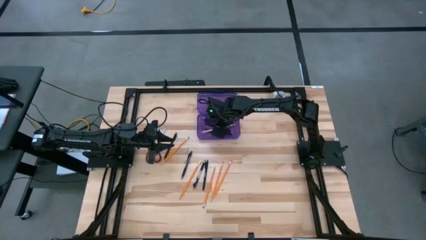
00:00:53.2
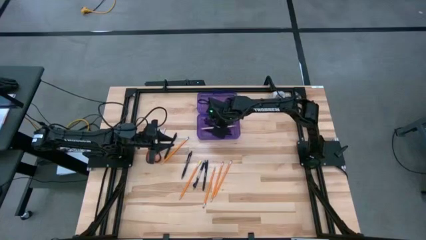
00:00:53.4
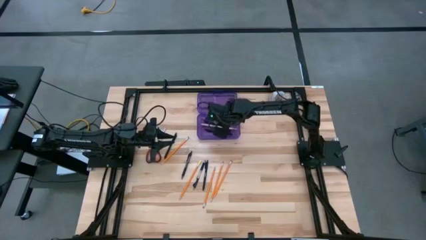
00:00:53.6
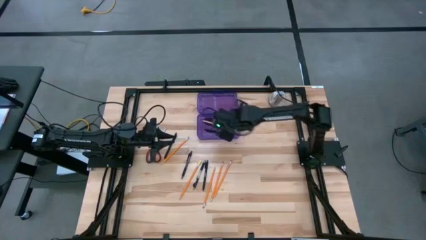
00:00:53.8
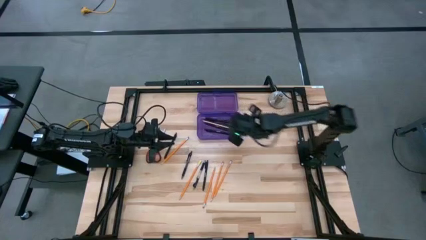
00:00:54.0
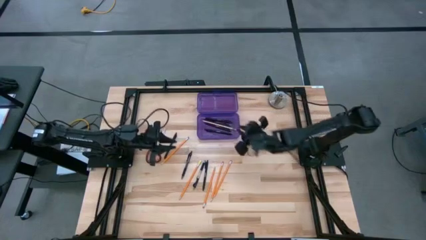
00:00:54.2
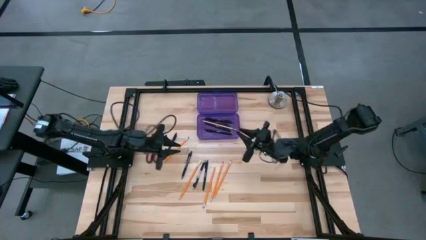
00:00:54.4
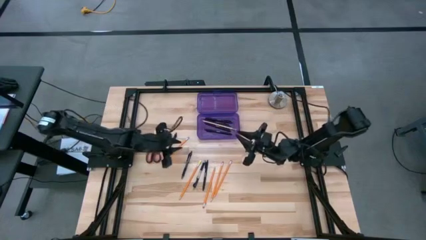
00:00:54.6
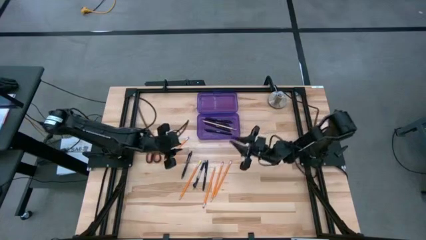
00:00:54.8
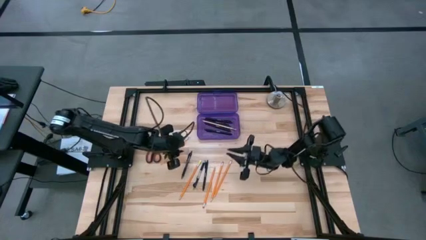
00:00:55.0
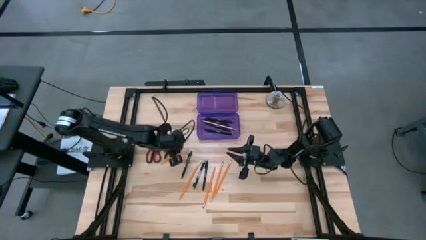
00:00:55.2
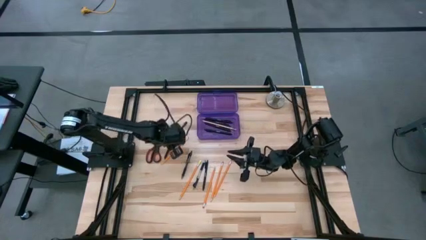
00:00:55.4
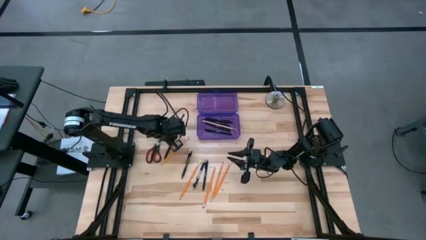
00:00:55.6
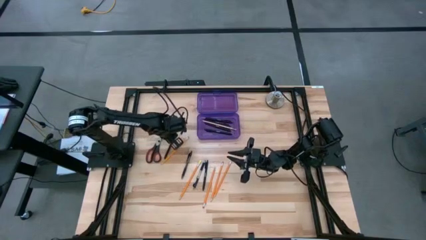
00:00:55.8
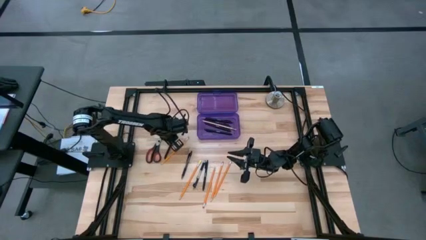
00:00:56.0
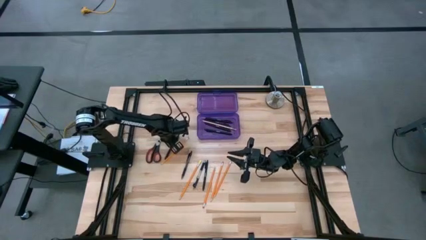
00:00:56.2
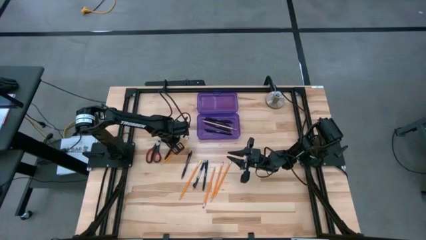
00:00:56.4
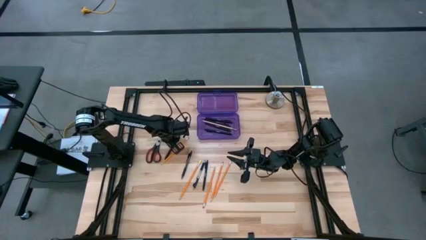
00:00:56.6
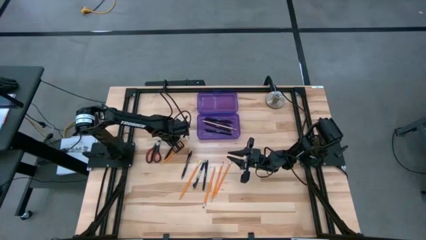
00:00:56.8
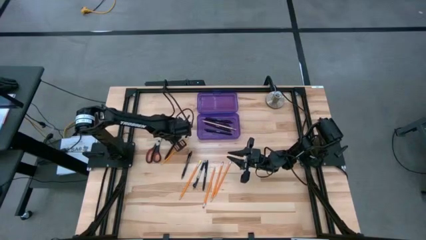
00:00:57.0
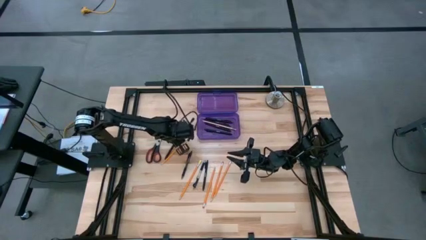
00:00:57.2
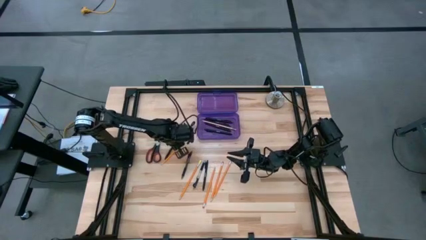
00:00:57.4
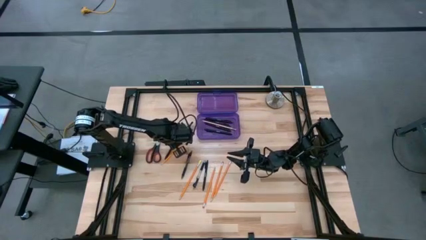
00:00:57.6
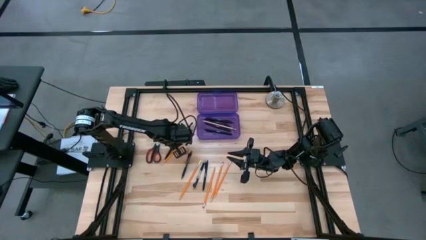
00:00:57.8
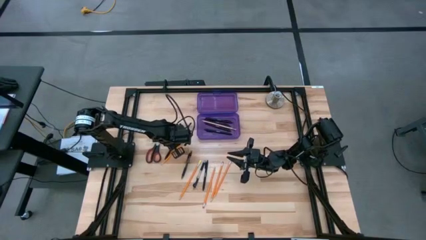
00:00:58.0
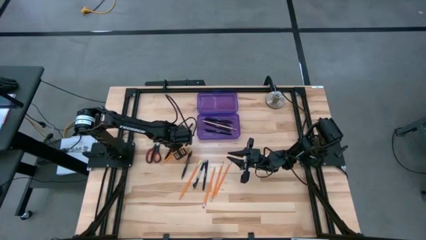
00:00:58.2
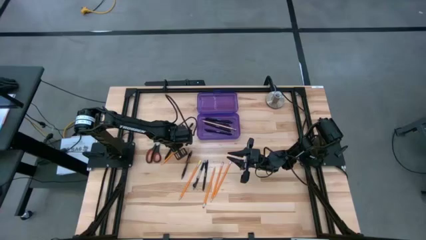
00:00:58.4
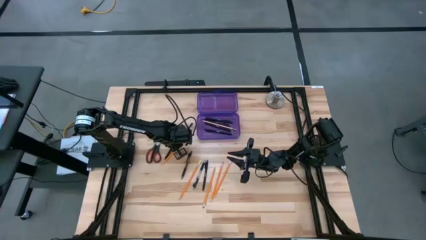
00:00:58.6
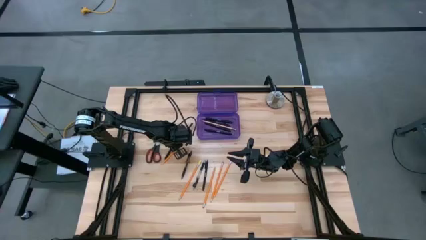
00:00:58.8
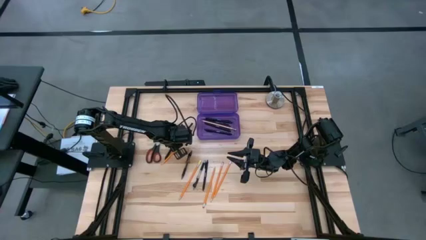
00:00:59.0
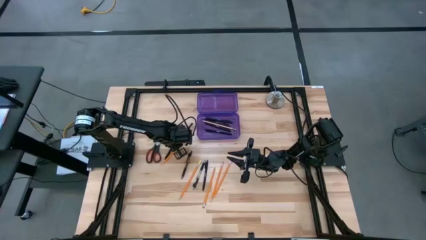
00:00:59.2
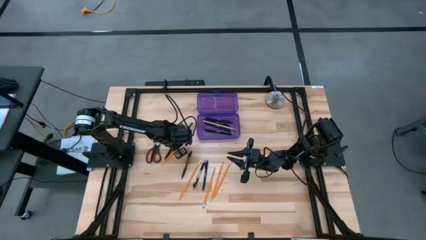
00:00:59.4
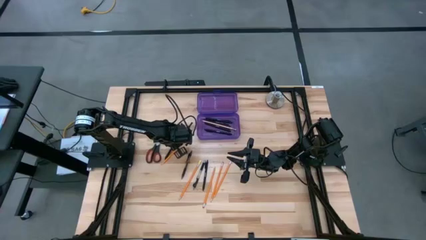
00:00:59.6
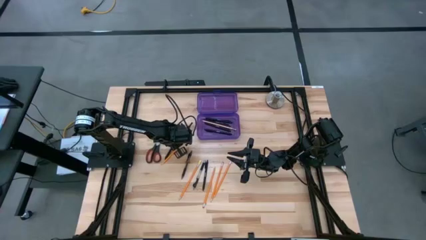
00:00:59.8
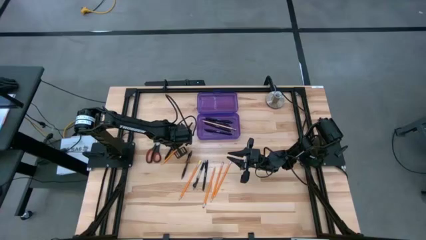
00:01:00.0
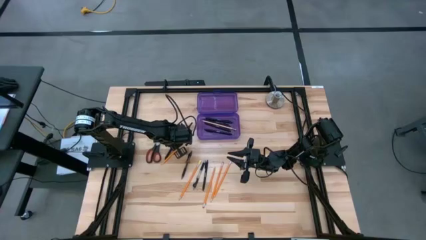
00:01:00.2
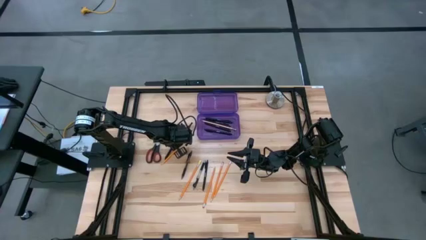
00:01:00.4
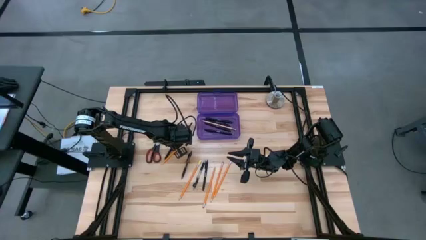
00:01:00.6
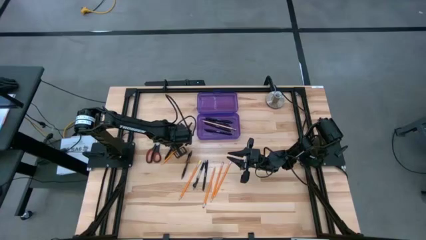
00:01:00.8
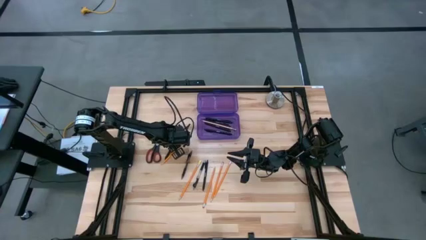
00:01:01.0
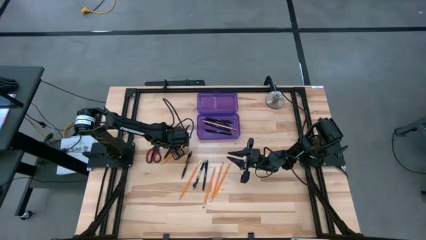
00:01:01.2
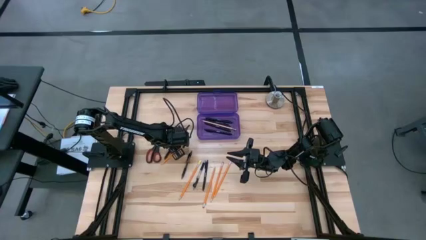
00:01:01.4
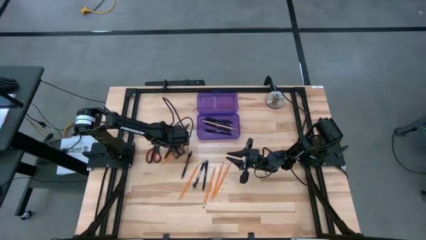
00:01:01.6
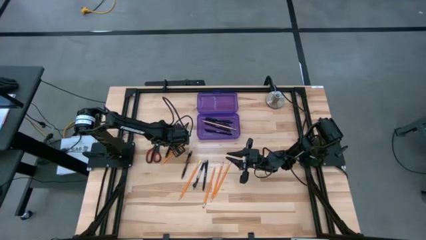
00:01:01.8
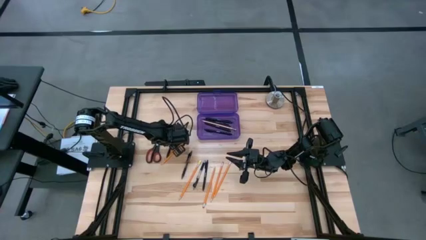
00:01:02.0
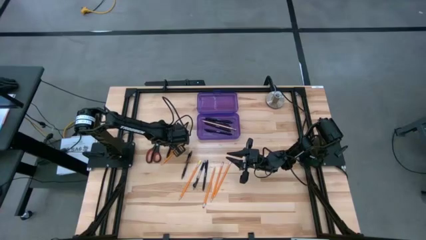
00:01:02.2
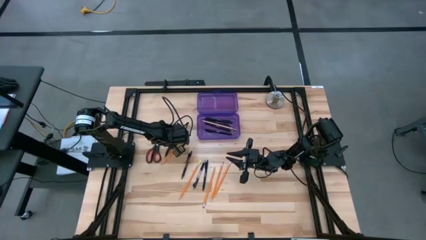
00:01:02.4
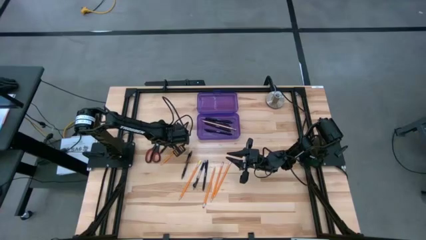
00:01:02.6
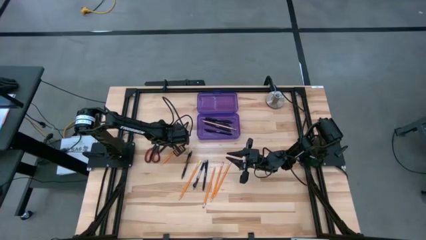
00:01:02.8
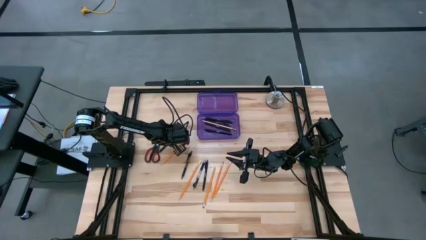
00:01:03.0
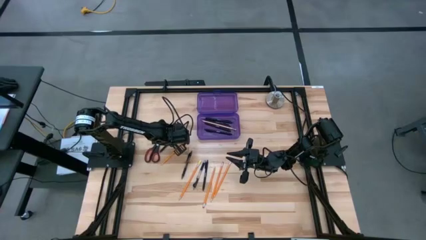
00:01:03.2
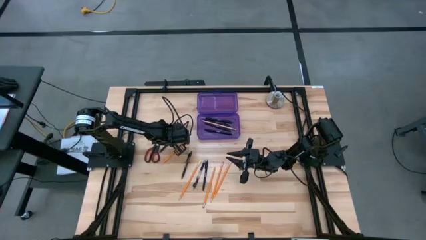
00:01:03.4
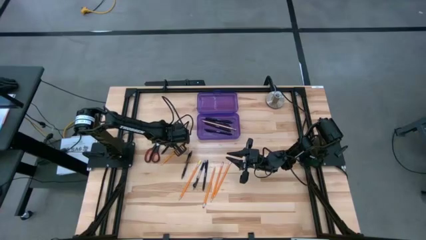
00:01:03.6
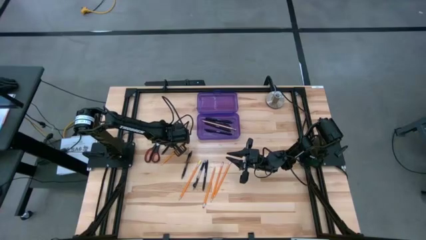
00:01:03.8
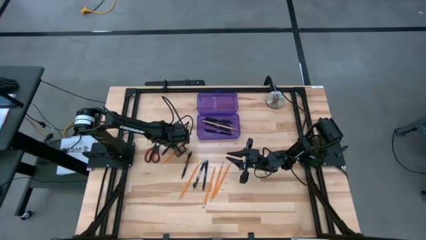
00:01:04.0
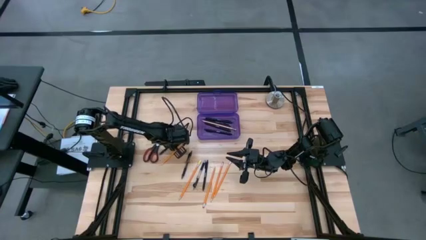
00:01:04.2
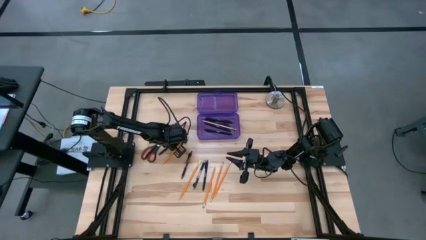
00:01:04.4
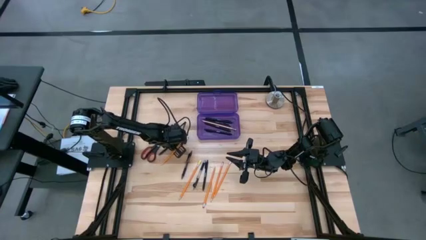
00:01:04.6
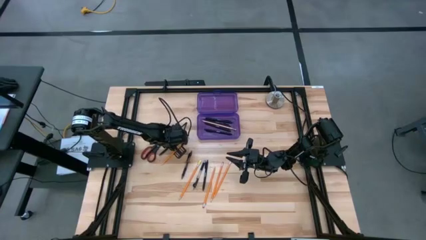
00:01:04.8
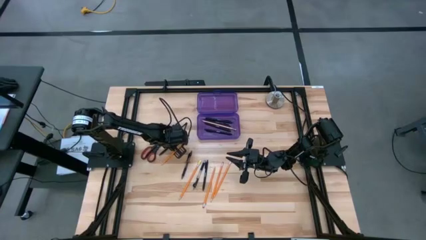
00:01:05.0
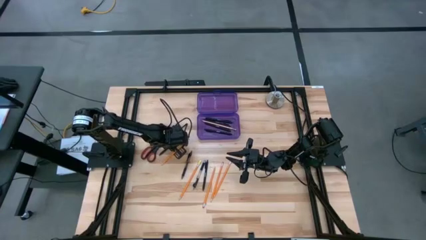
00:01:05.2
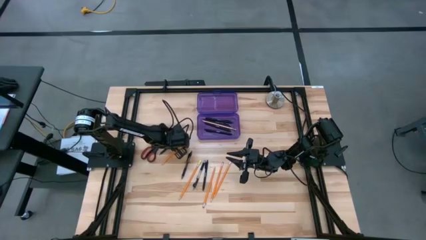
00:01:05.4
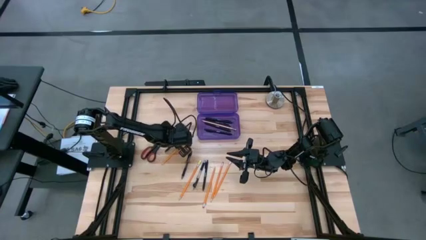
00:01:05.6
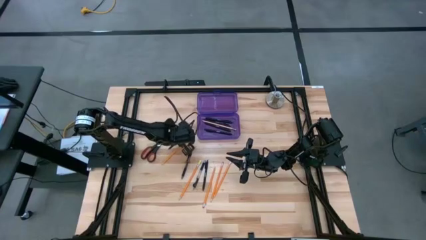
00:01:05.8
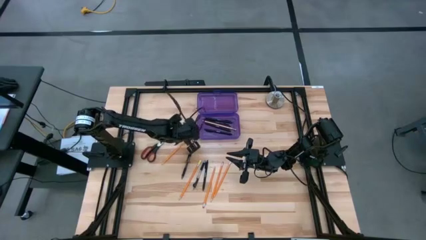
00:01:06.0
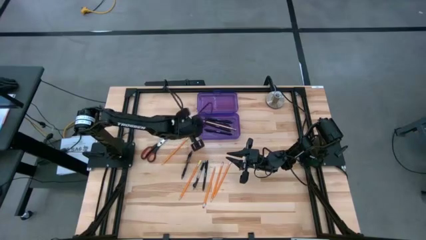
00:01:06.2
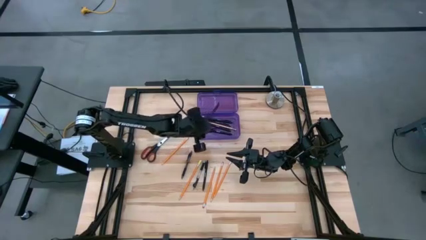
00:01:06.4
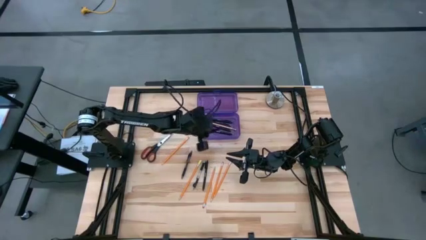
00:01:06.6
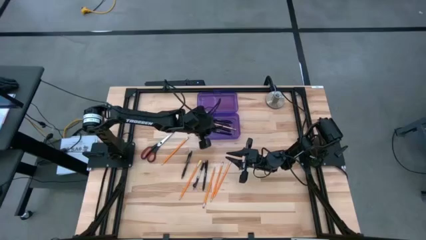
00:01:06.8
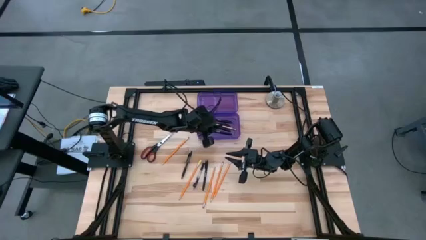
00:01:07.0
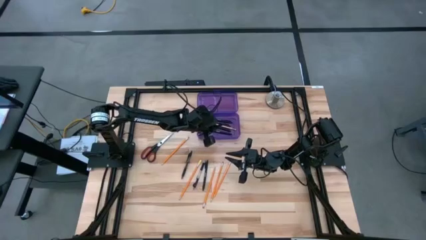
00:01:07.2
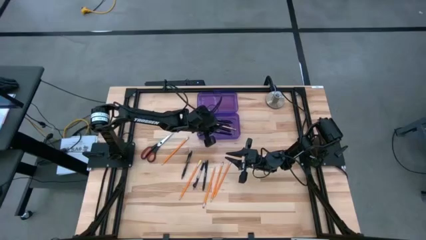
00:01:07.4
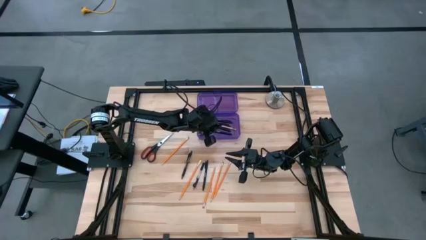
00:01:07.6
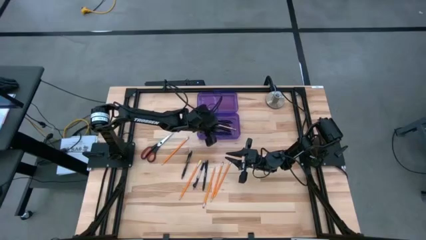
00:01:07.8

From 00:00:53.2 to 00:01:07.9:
Task: Pick & place school supplies into a supply box
Put the black pen into the the purple supply box
